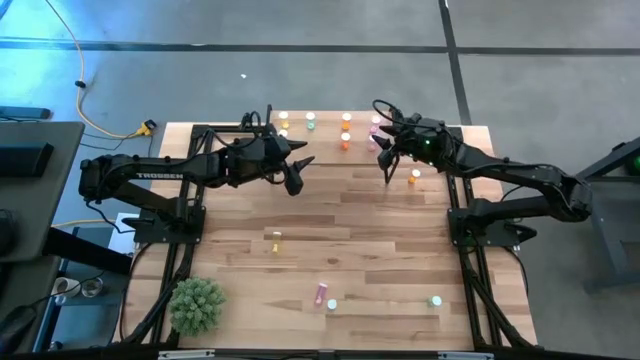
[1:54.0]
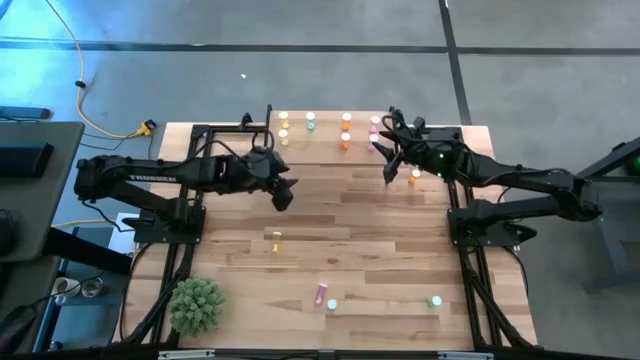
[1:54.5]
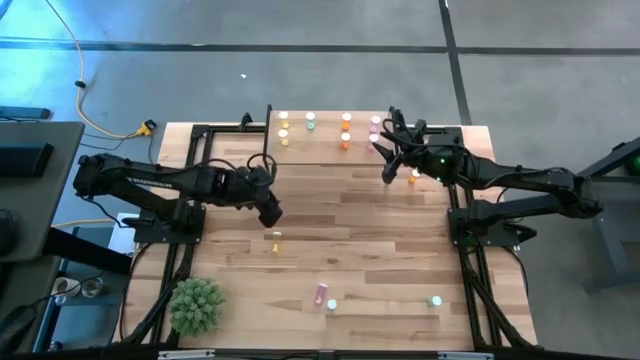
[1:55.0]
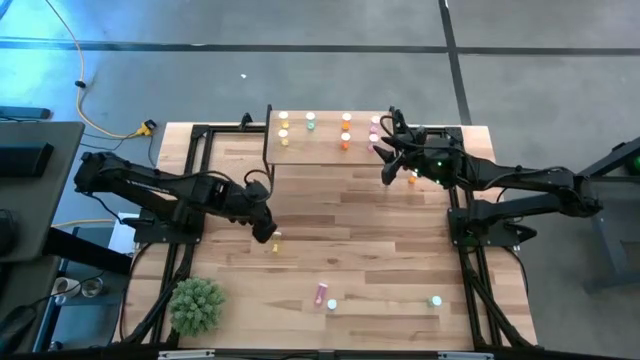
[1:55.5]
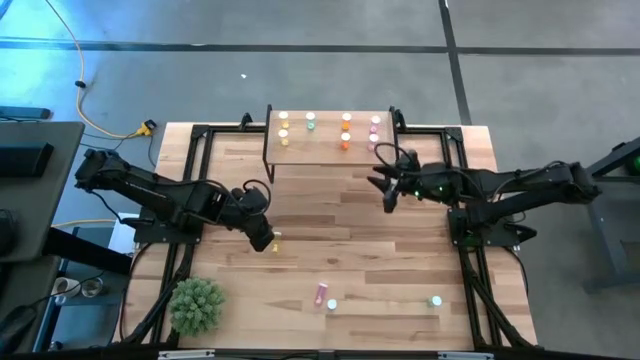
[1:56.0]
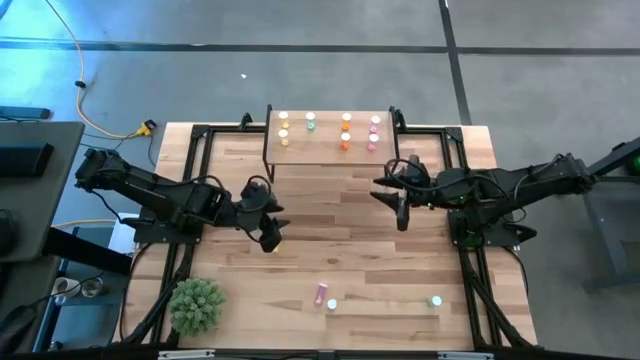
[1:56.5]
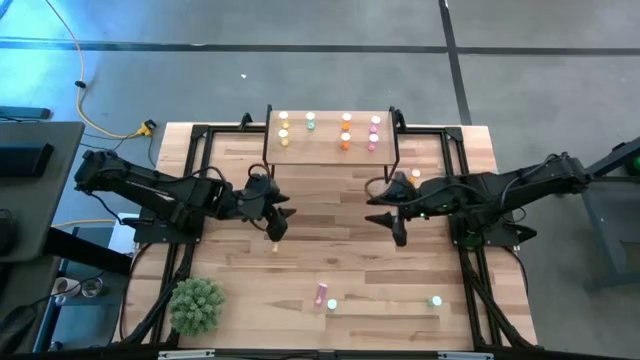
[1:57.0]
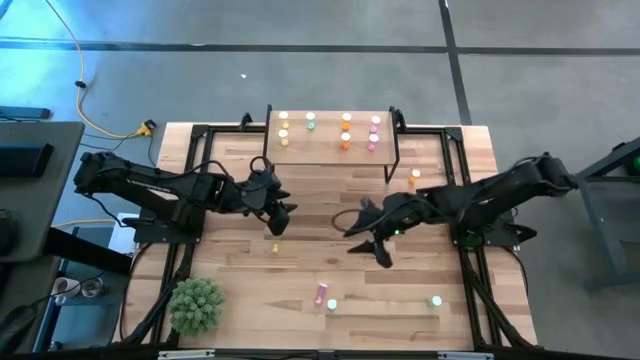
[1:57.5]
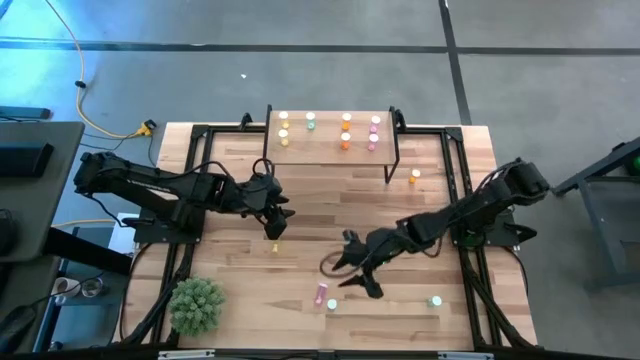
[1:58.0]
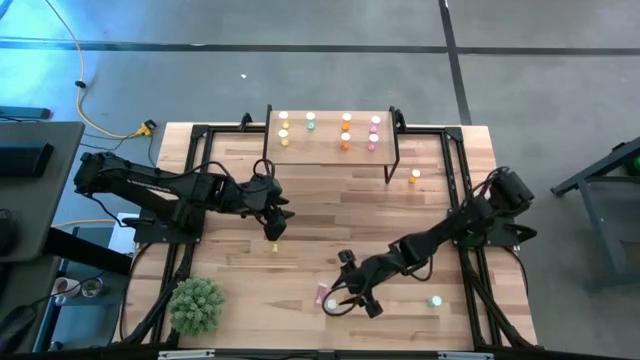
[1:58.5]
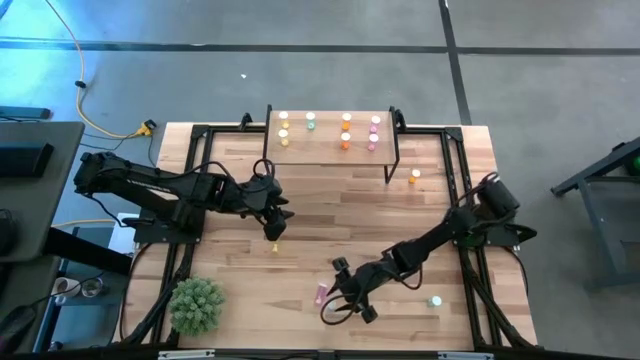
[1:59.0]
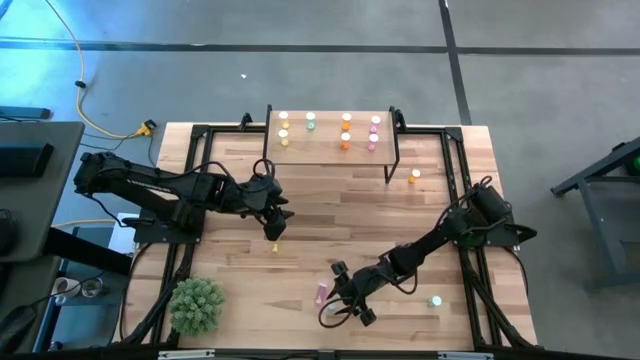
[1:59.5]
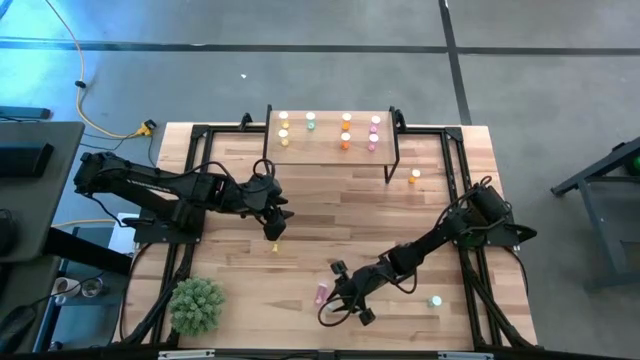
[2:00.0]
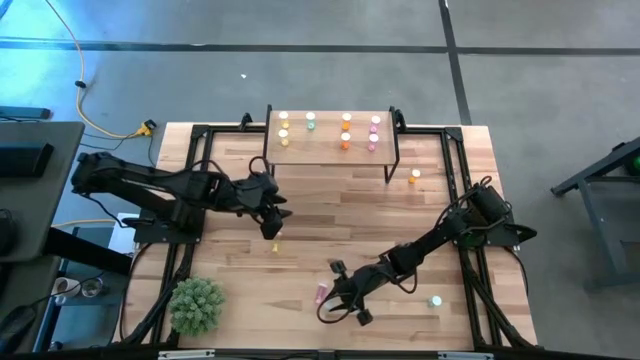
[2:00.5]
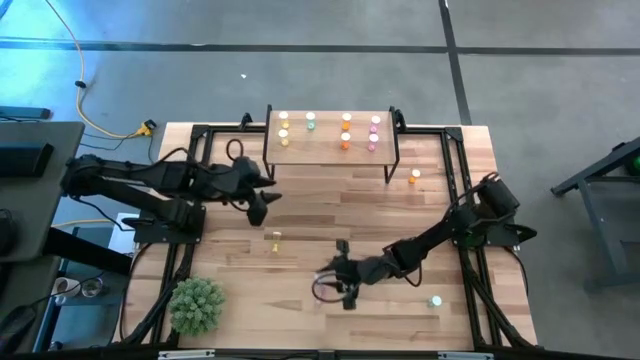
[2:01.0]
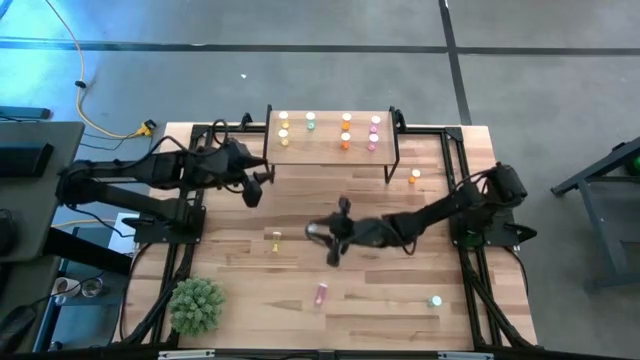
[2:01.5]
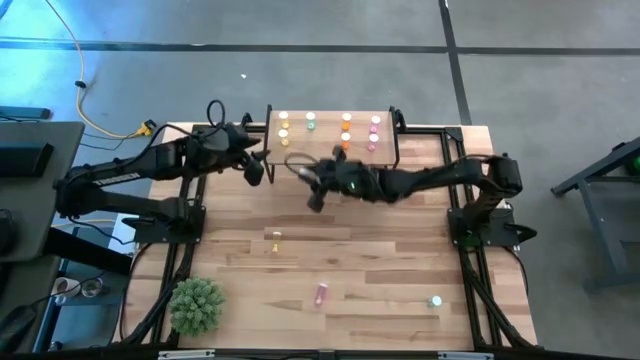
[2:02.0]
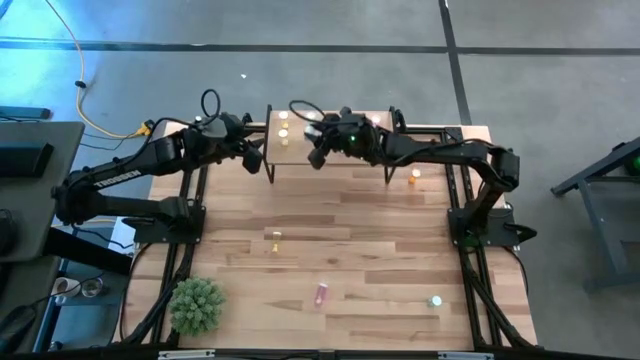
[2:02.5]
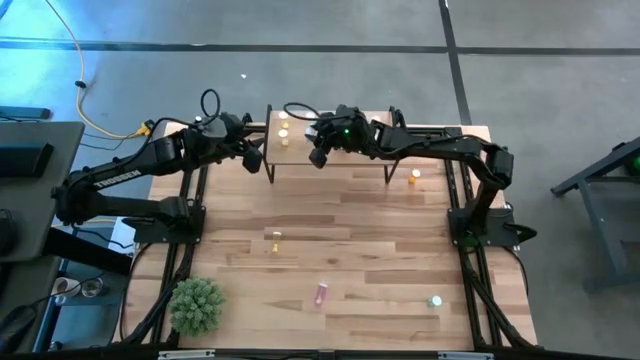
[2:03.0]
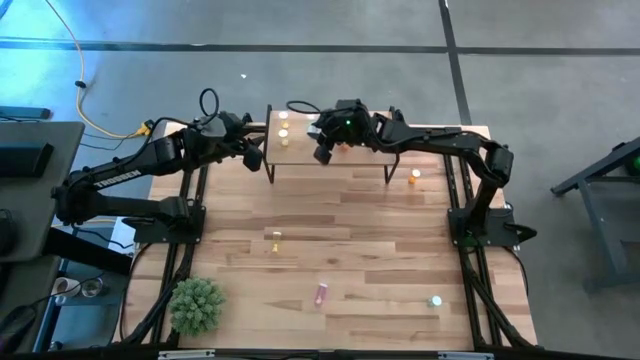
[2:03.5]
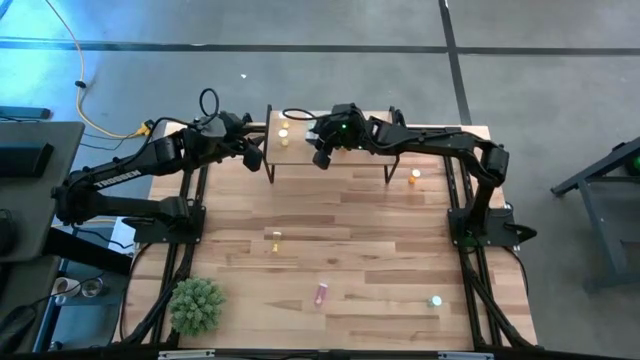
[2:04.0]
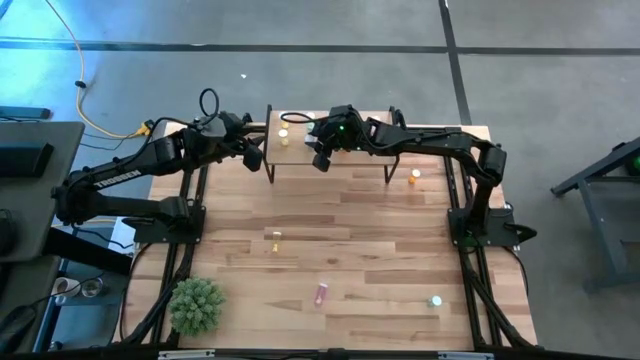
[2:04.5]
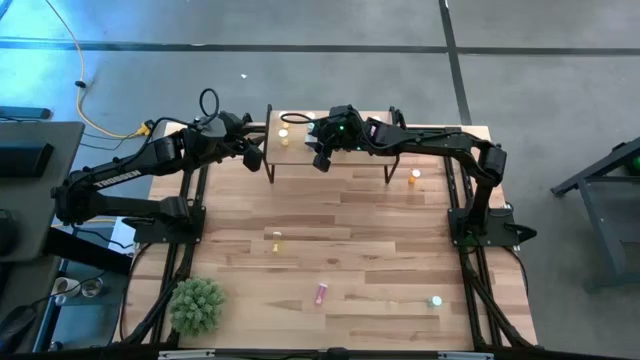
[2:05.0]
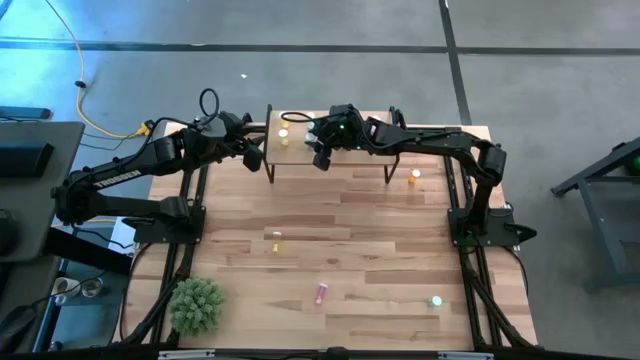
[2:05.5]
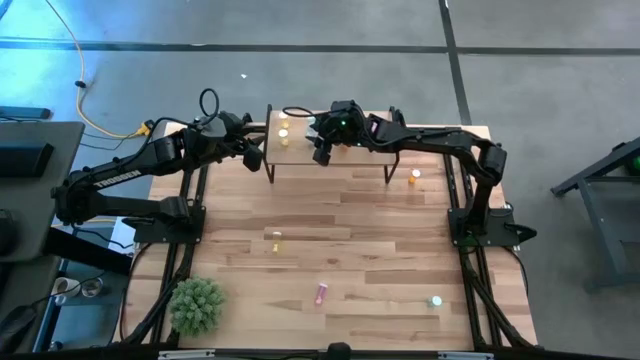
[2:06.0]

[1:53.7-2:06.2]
Task: Pick and place medicine bottles onto shelf by color
Put the left blue pill bottle on the shelf aligned with the other blue pill bottle

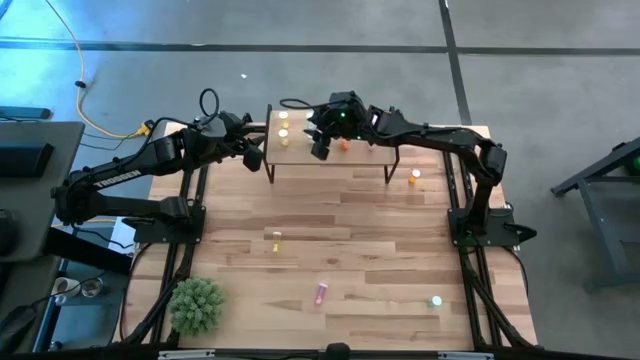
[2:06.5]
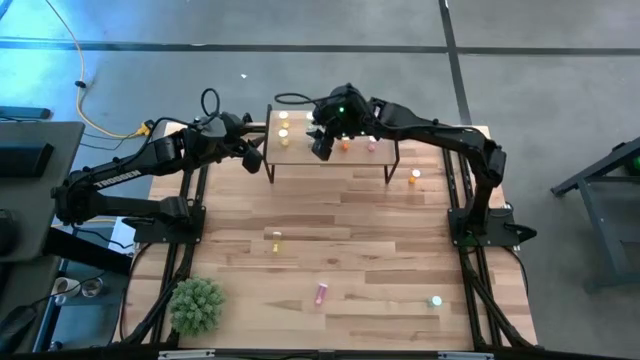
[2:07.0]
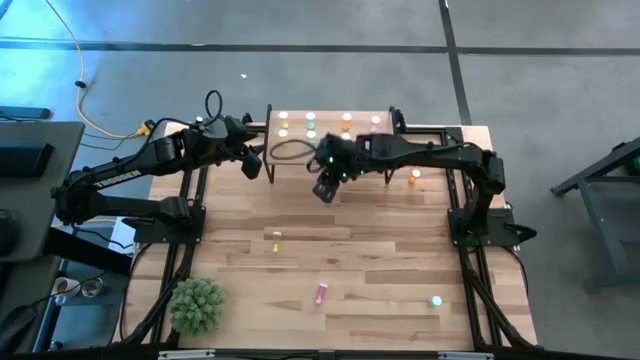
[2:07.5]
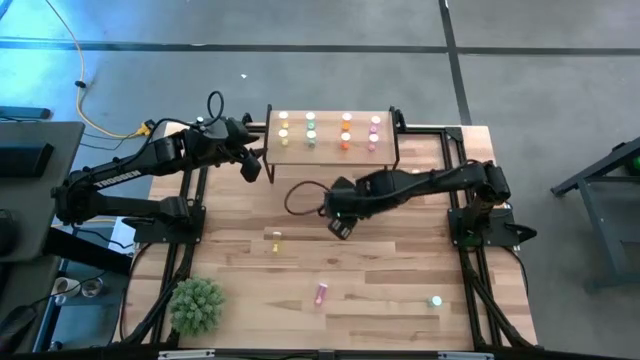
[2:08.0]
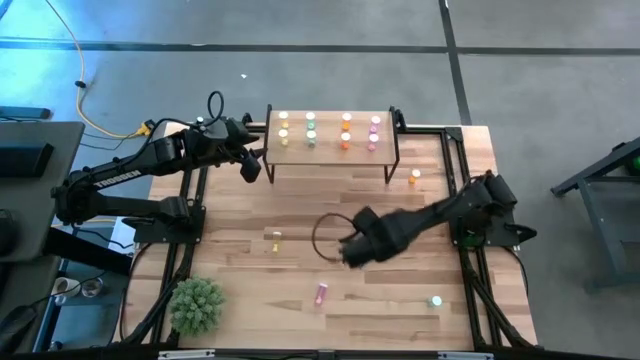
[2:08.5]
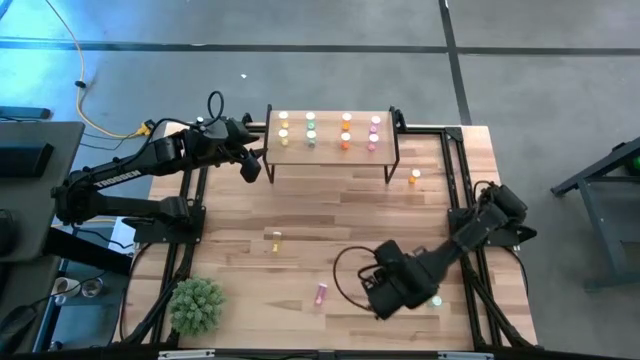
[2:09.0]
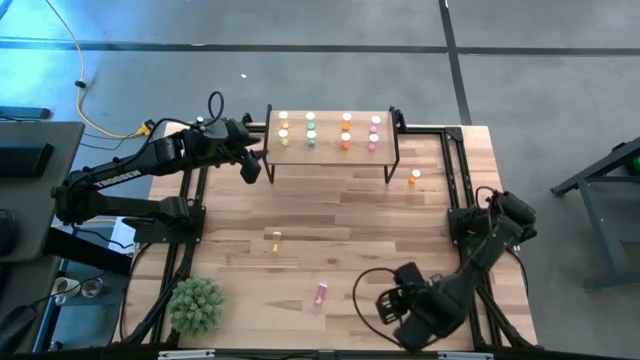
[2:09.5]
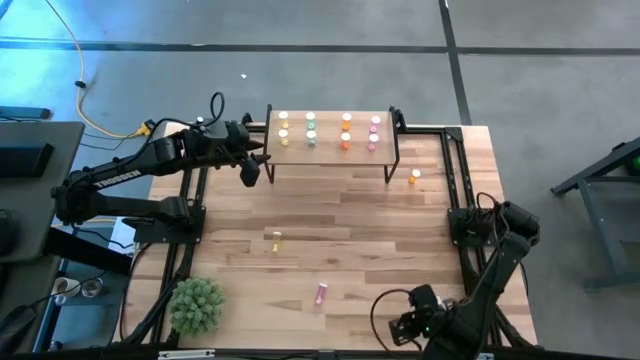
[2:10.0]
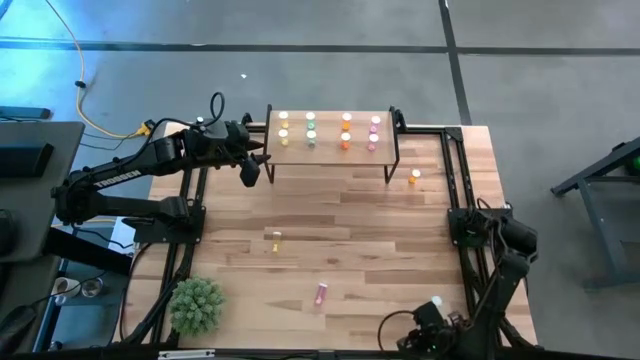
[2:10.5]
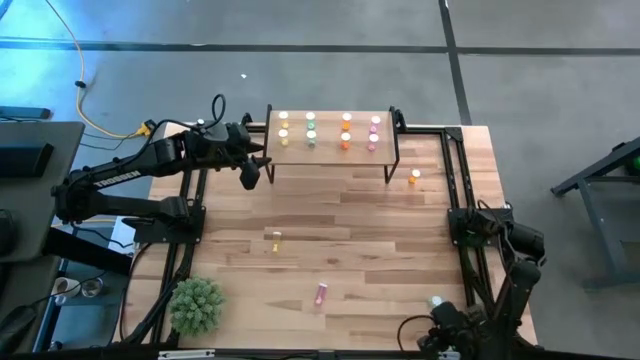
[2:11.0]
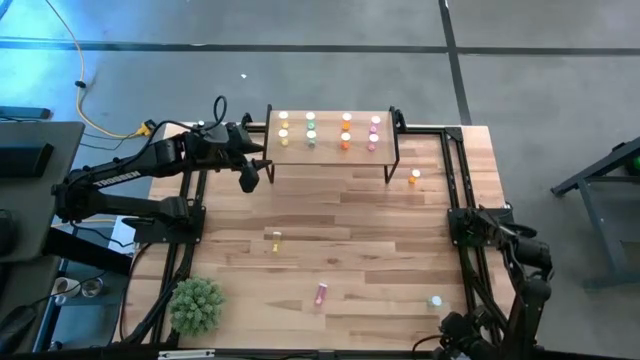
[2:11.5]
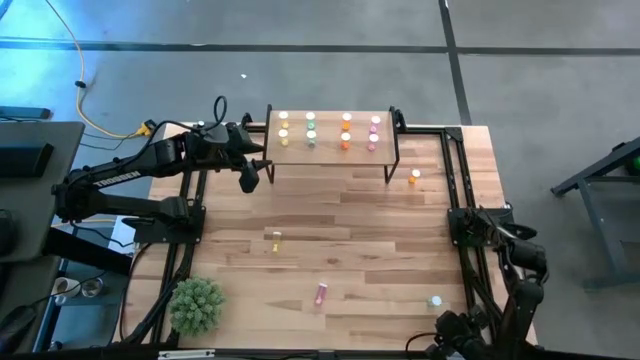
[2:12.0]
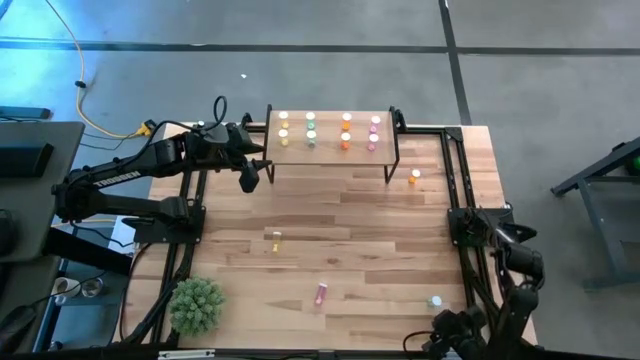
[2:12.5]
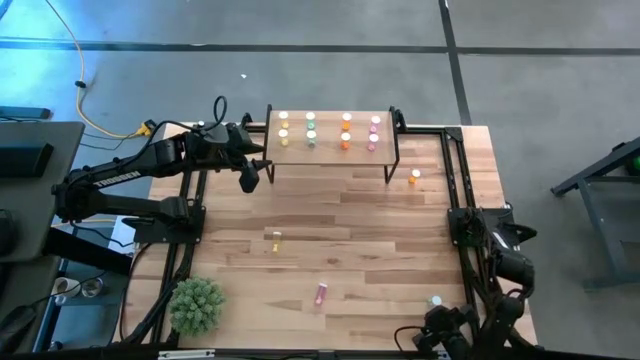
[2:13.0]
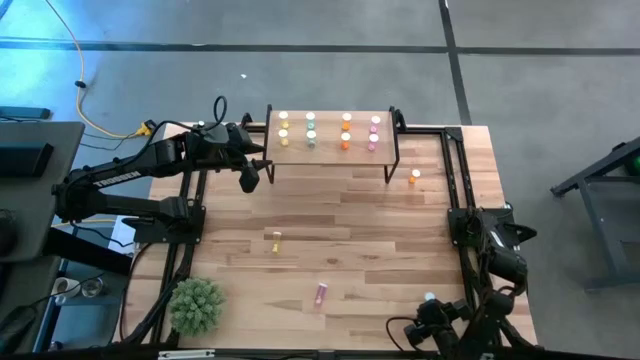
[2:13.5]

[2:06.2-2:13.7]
Put the blue pill bottle on the shelf aligned with the other blue pill bottles

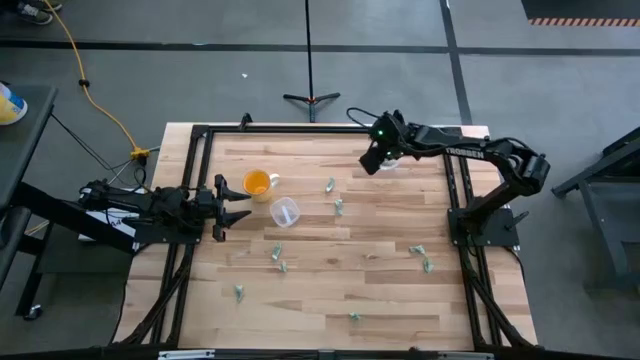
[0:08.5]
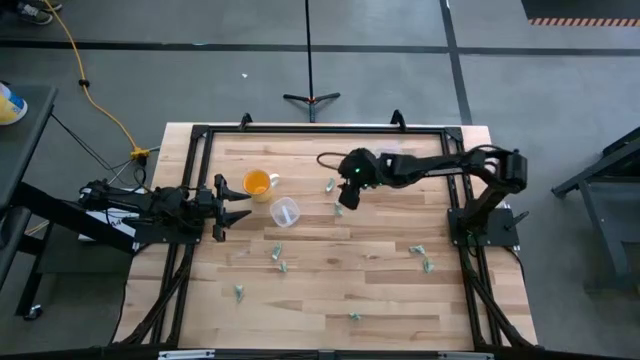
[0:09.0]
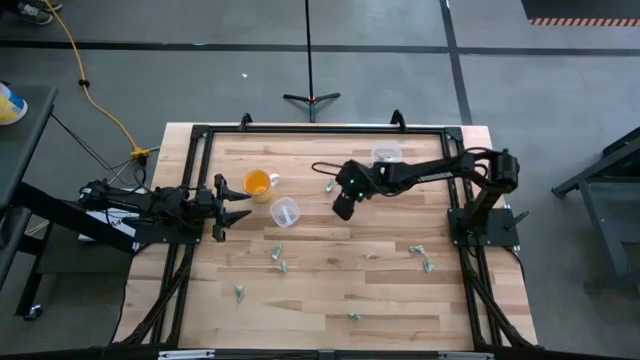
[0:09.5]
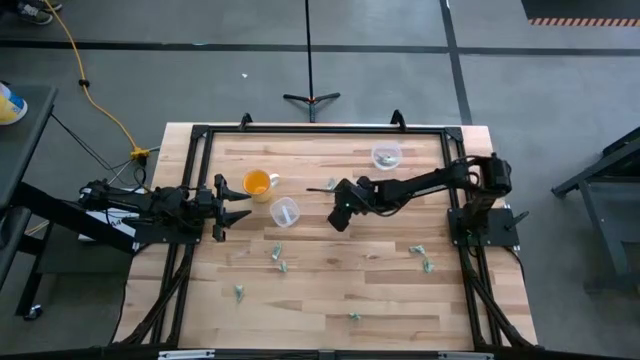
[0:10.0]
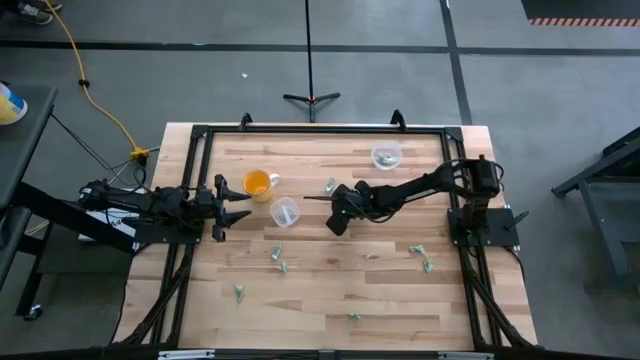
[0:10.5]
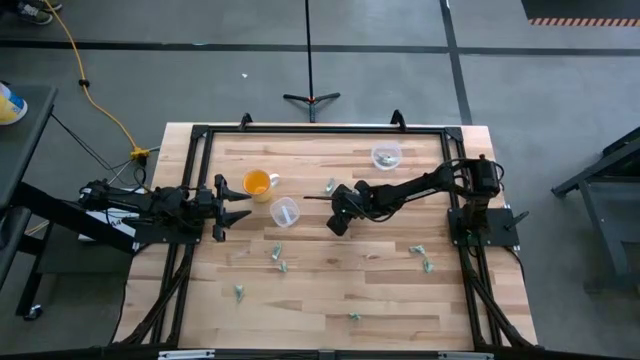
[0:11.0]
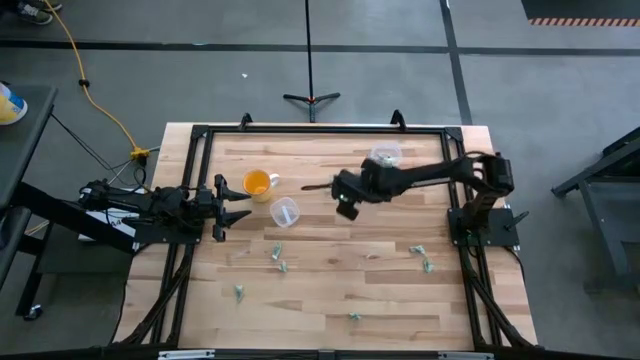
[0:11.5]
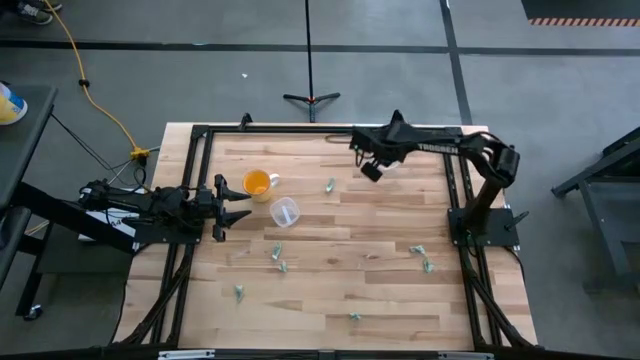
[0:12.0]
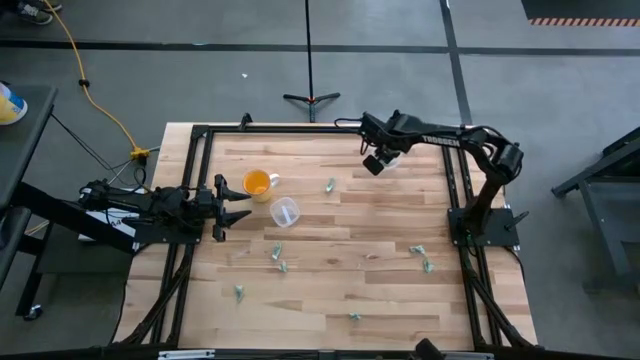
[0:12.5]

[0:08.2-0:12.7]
Task: Pick and place Stevia / Truvia into bins
Put the stevia packet into the top transparent container
